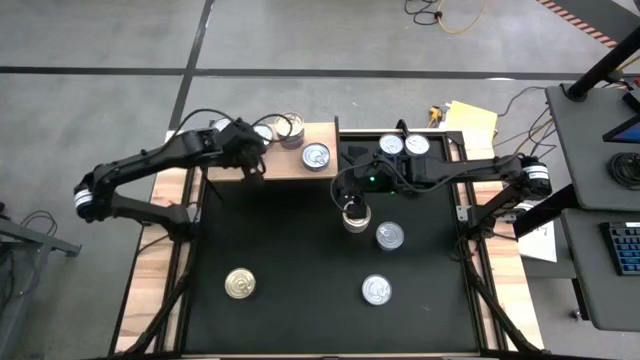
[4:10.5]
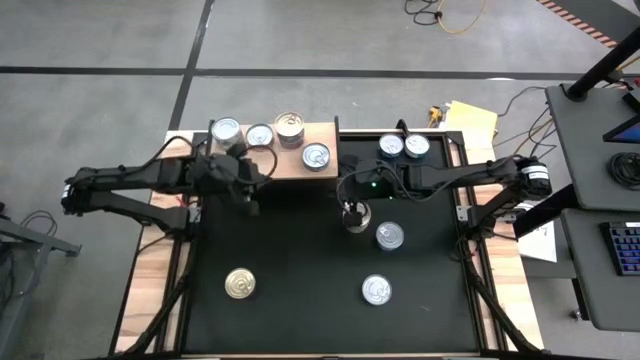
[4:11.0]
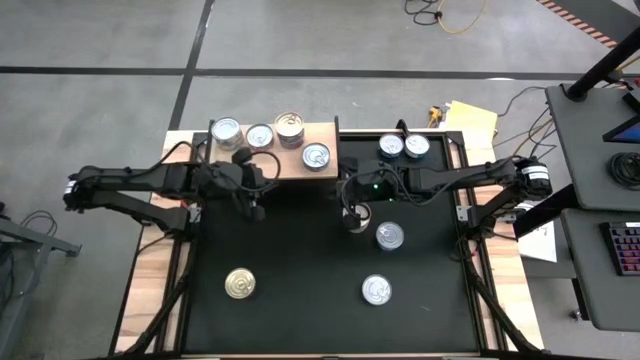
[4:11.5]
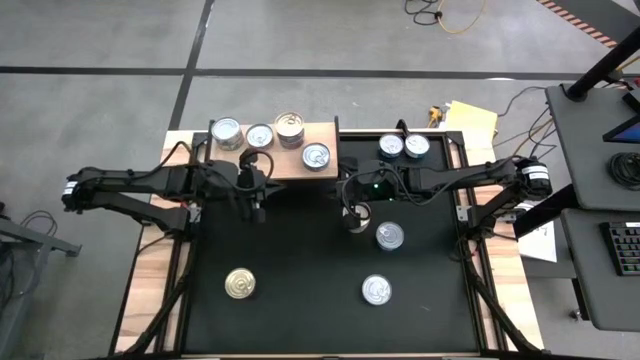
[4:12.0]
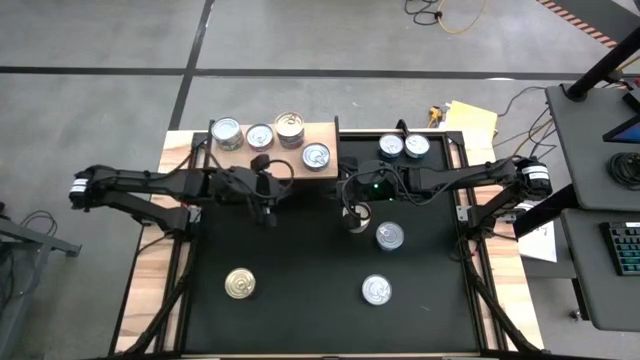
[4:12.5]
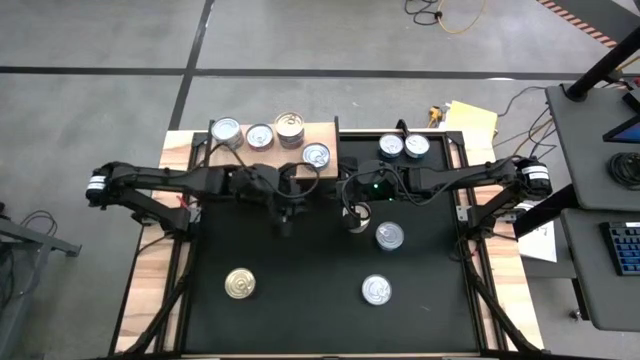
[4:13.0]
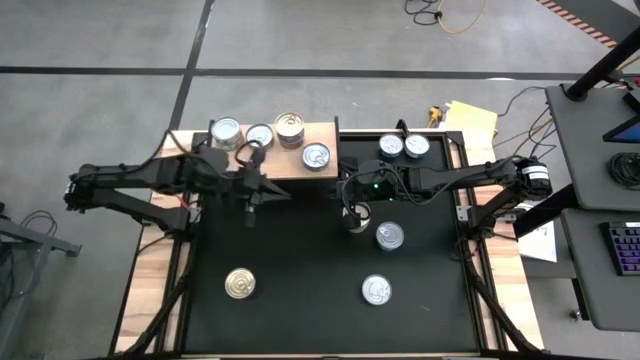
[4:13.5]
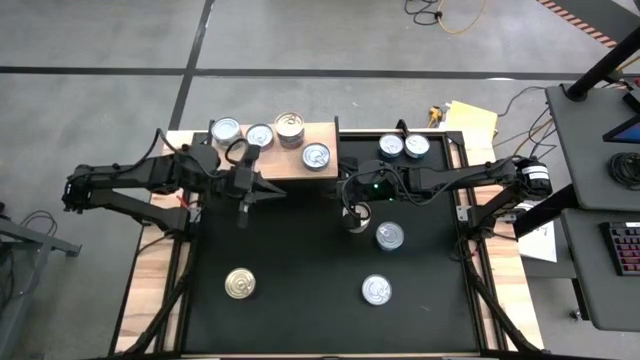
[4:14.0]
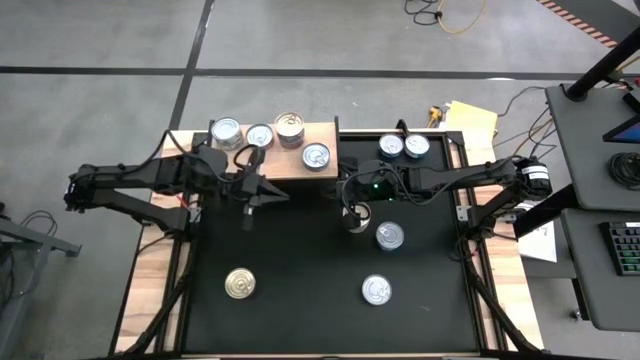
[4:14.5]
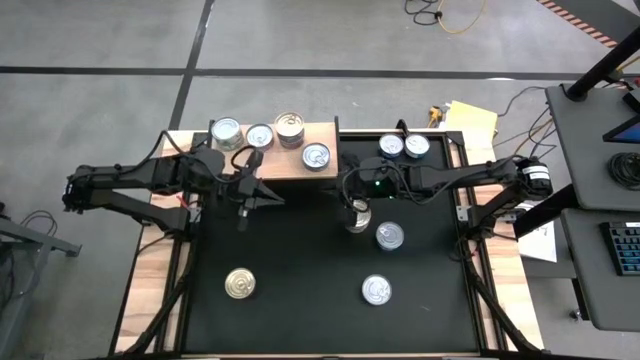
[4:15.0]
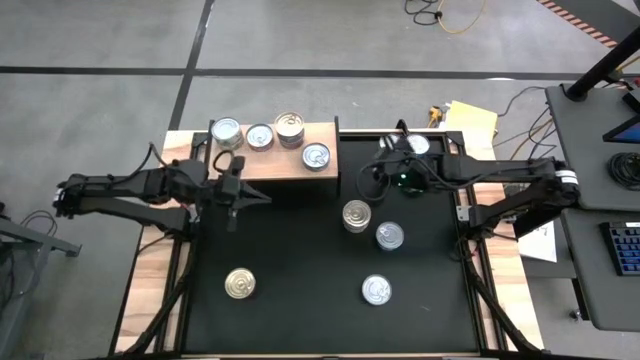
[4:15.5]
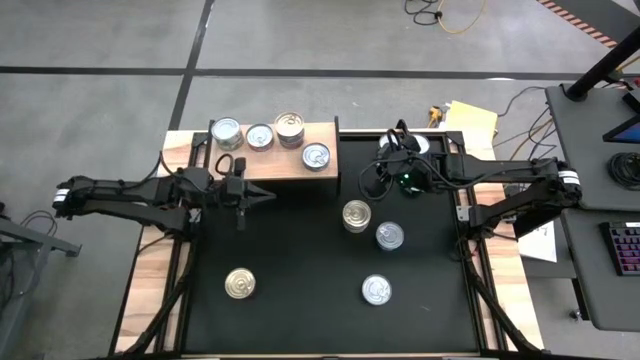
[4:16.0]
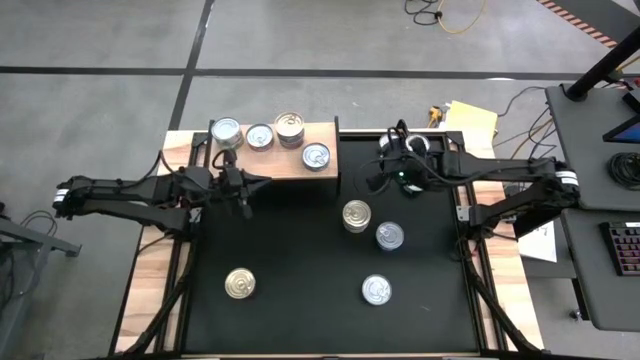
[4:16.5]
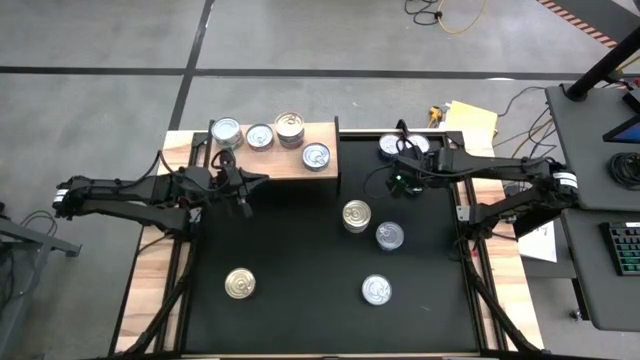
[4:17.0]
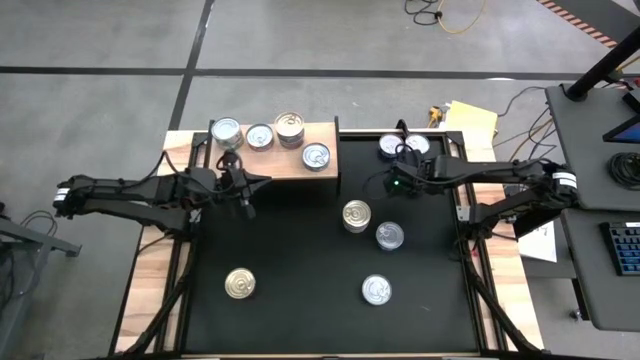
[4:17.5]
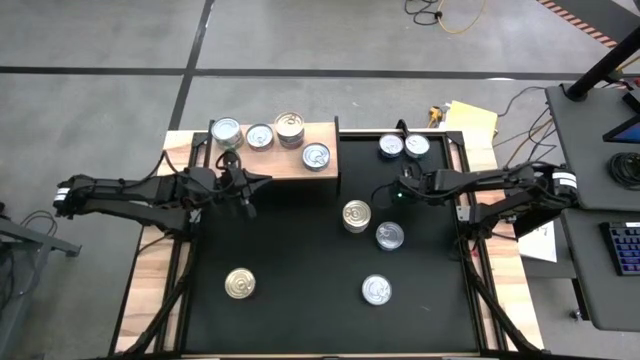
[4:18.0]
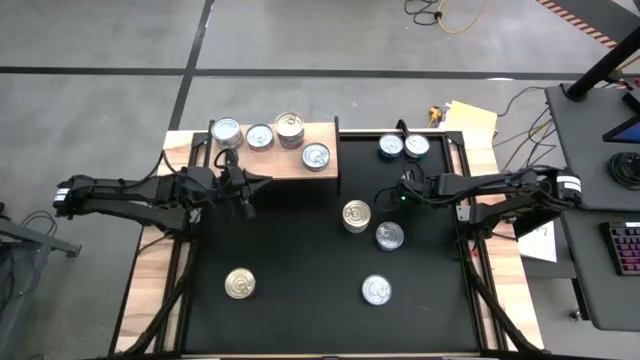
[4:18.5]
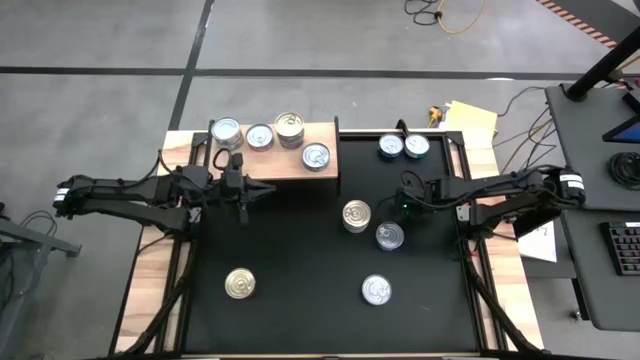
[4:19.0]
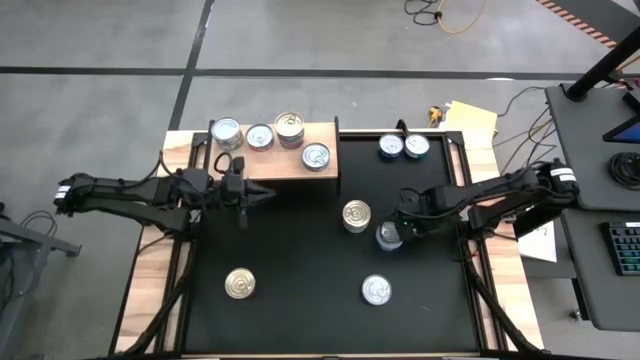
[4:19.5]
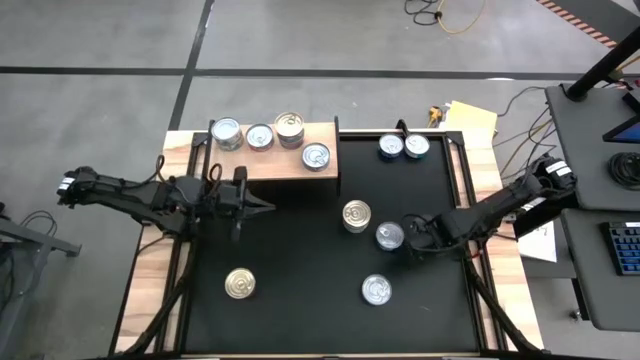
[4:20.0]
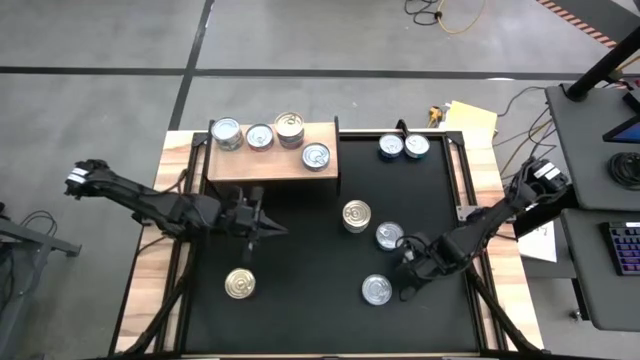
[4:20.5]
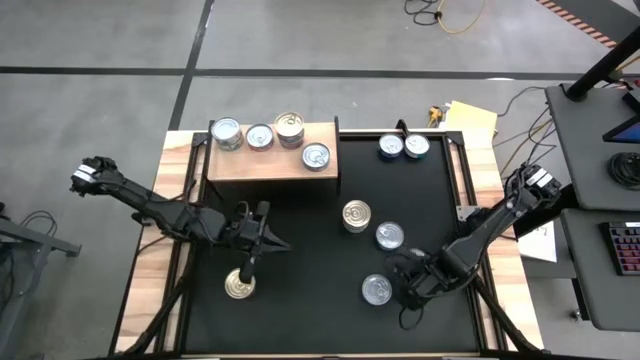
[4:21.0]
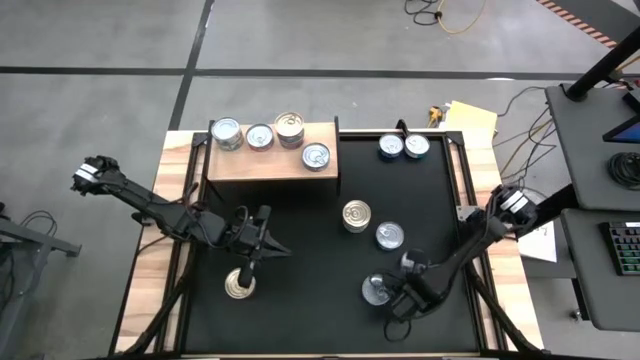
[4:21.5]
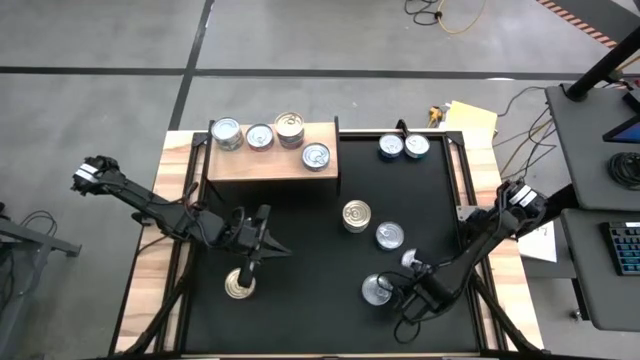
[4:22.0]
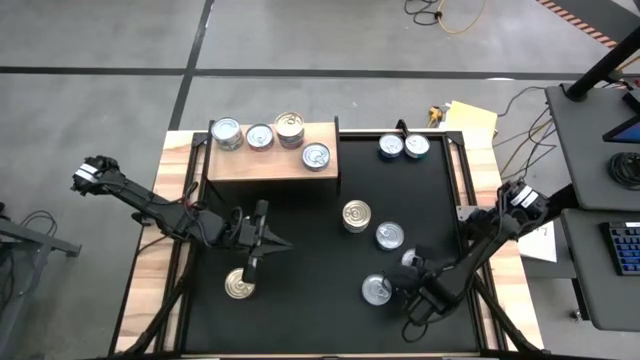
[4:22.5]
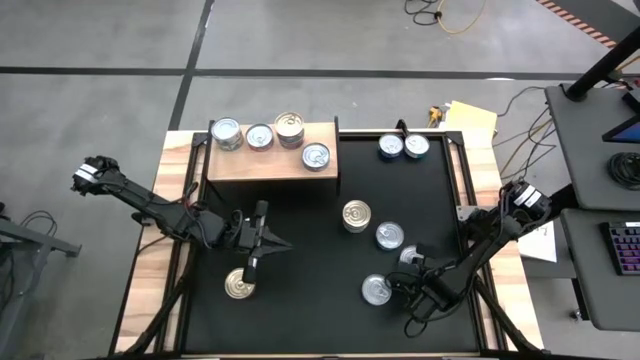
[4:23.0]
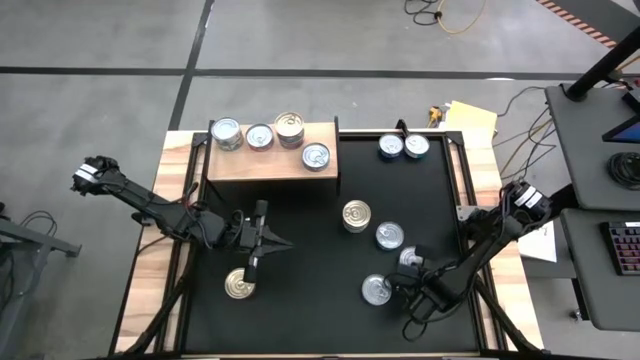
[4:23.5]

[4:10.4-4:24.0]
Task: Stack canned seafood by type on shelf
Move the blue tuna can to the bottom right of the table

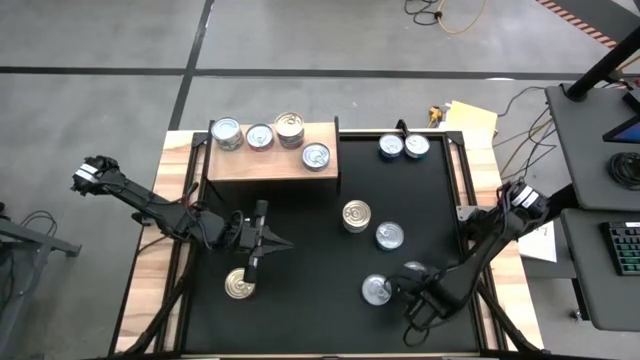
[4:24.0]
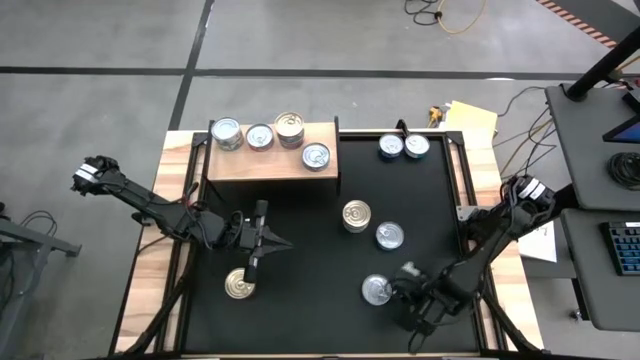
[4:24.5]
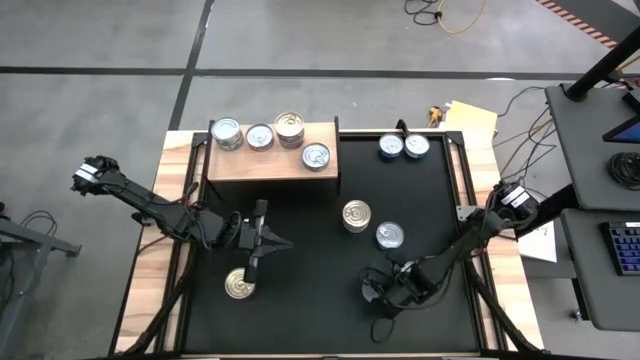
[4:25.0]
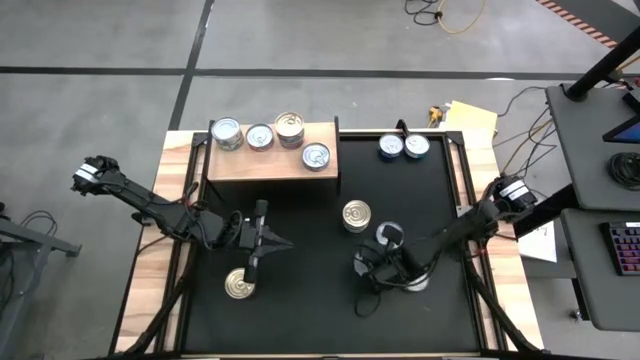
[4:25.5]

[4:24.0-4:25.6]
Adjust the green tuna can

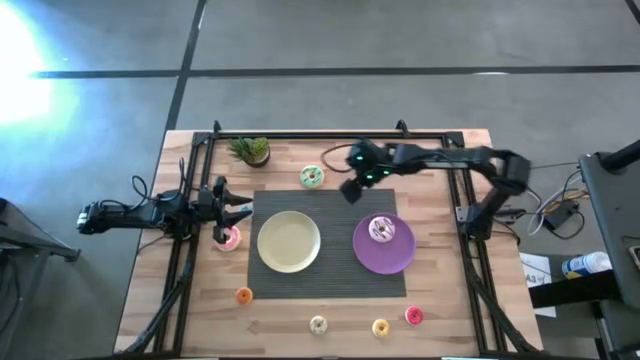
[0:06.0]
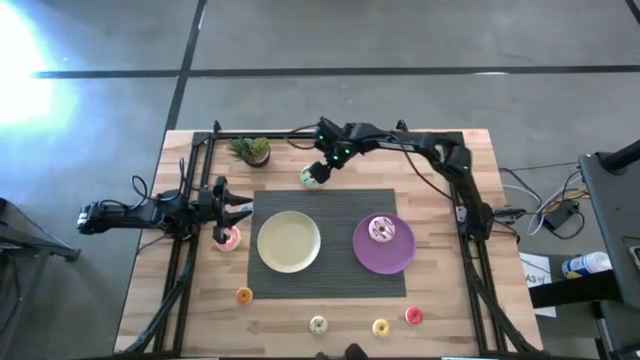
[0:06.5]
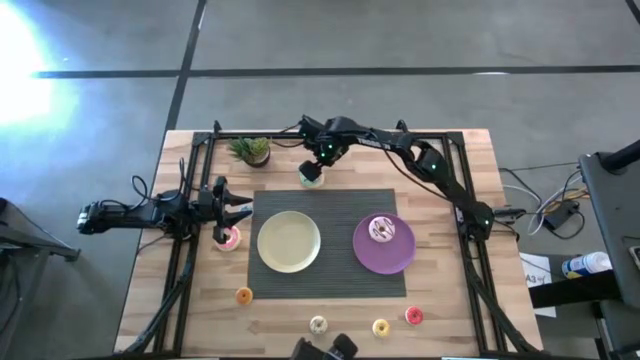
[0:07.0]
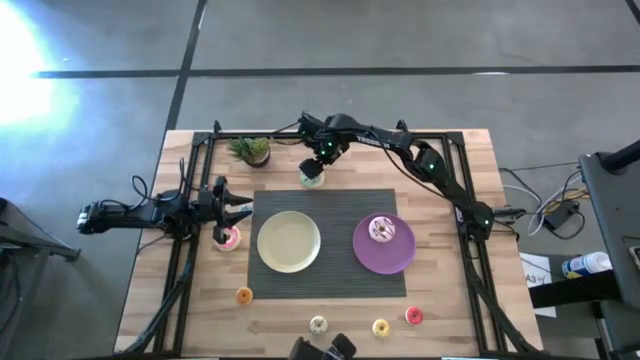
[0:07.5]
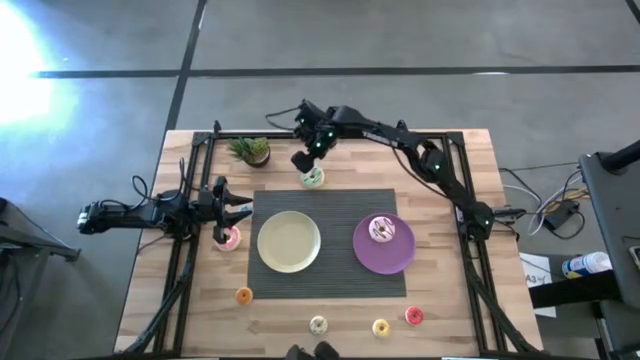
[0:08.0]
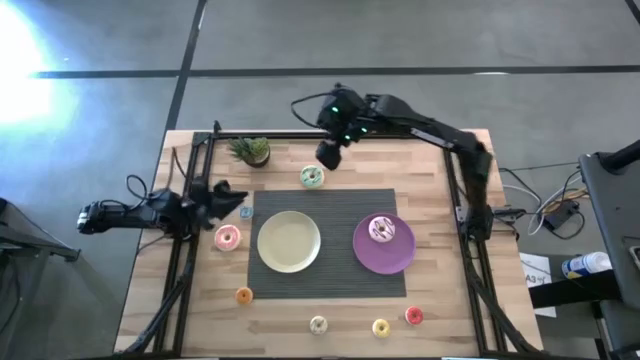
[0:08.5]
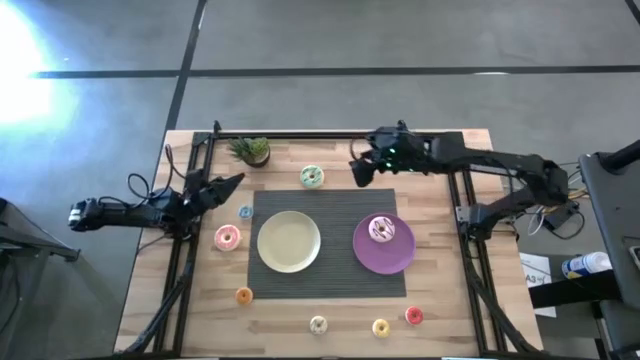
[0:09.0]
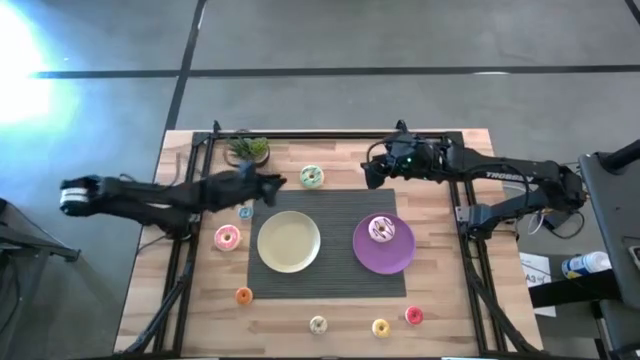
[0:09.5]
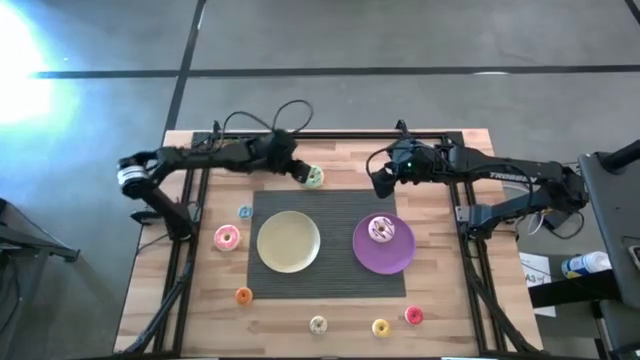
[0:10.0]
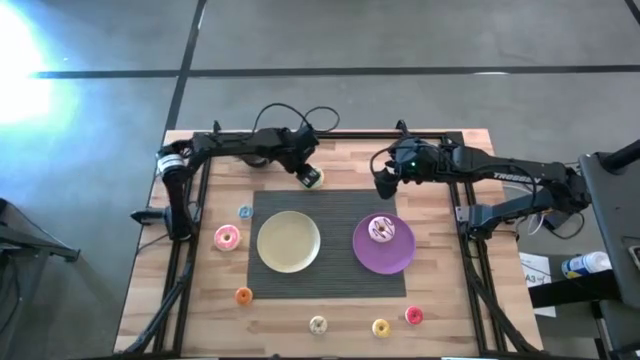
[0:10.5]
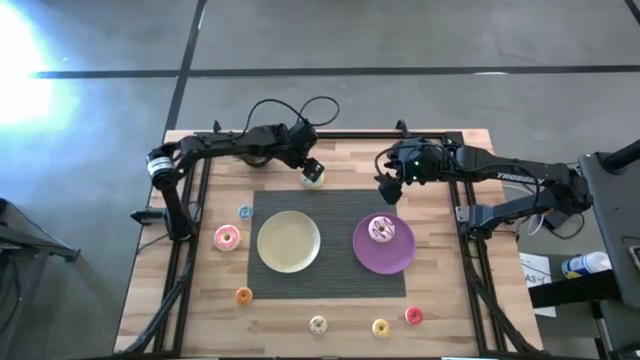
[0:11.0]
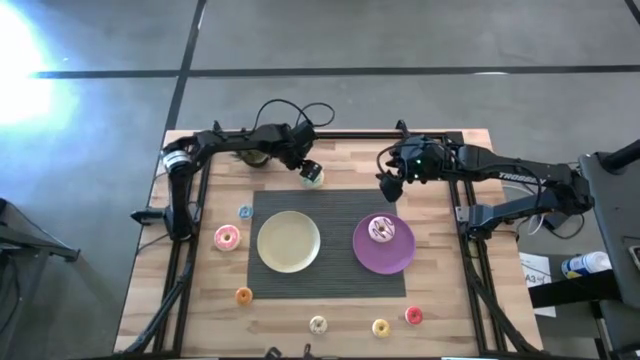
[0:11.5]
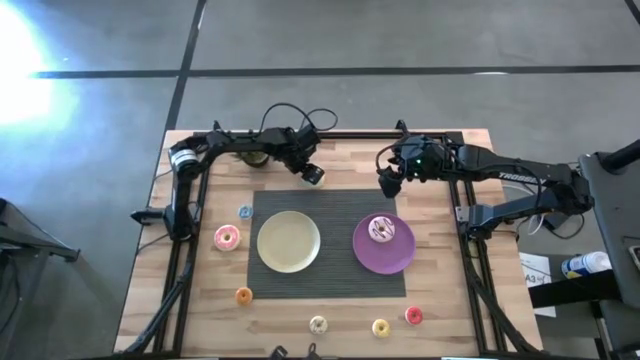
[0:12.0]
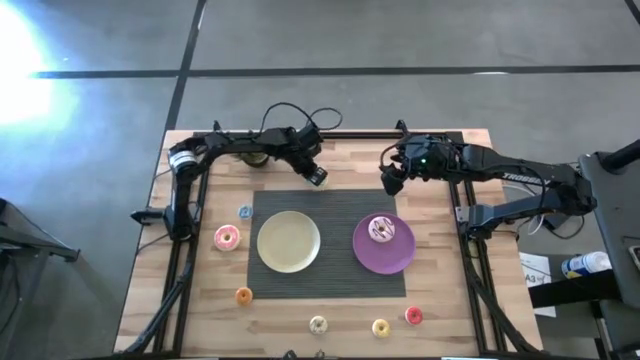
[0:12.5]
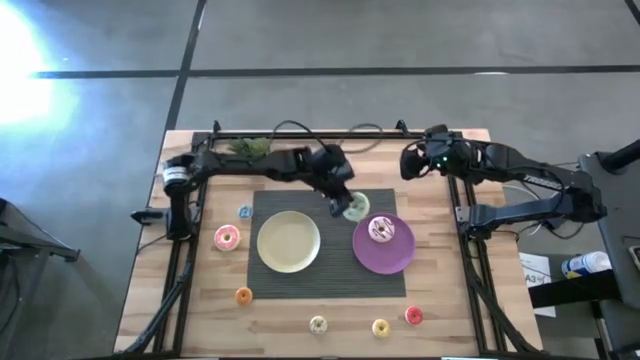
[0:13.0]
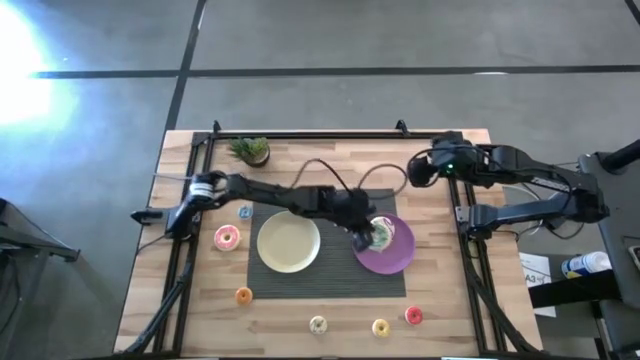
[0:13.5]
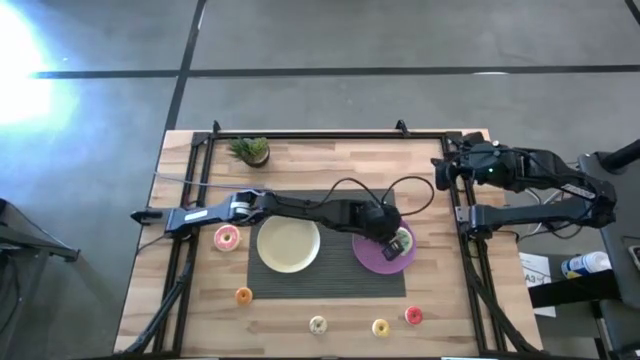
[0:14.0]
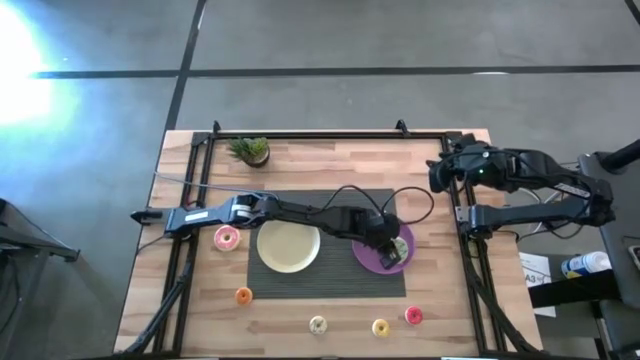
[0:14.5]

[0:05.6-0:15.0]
Task: Pick & Place donuts
Put the big green donut on the purple plate
